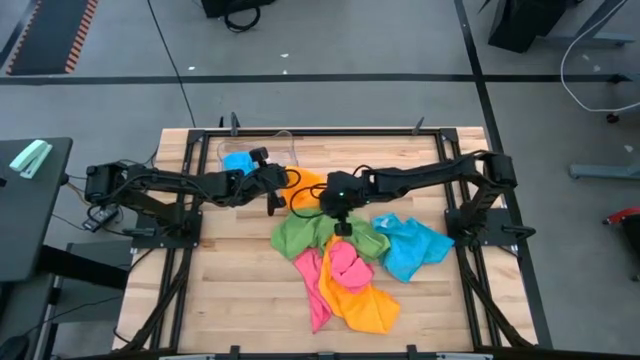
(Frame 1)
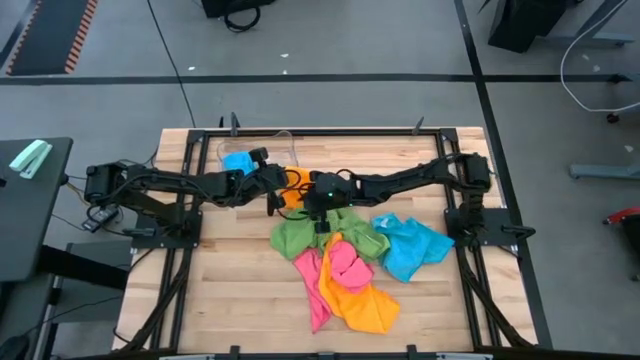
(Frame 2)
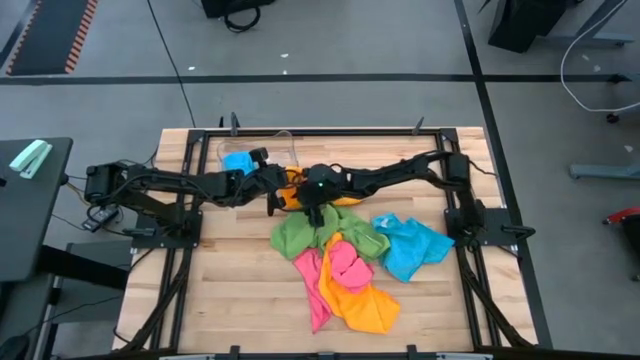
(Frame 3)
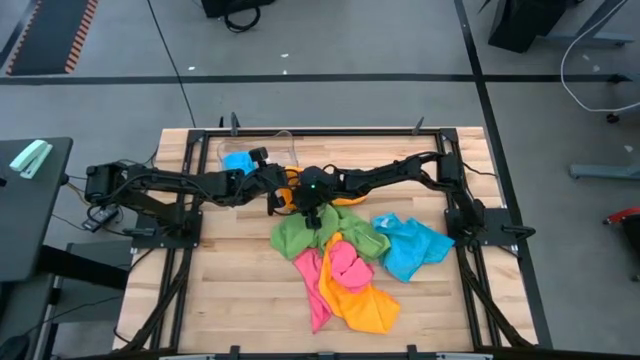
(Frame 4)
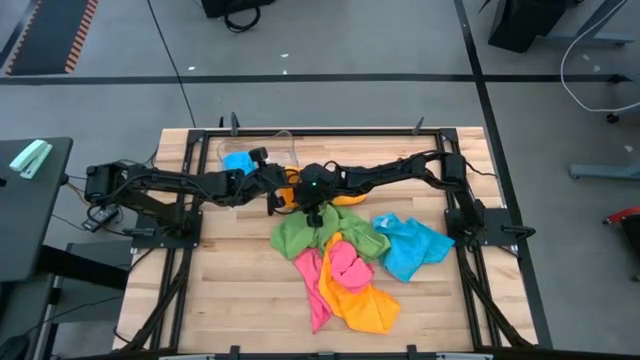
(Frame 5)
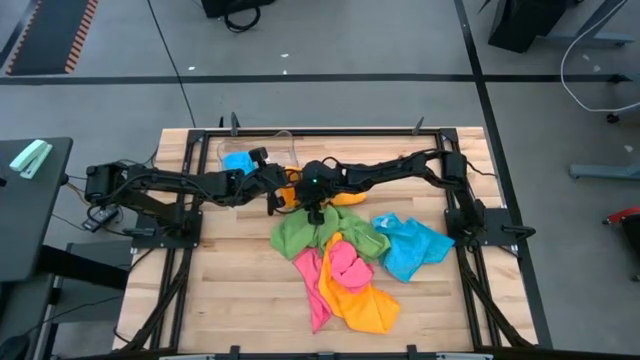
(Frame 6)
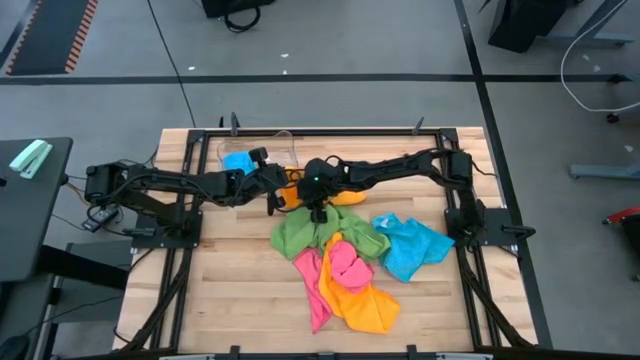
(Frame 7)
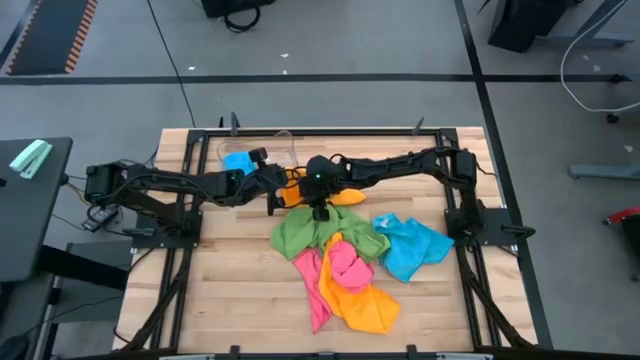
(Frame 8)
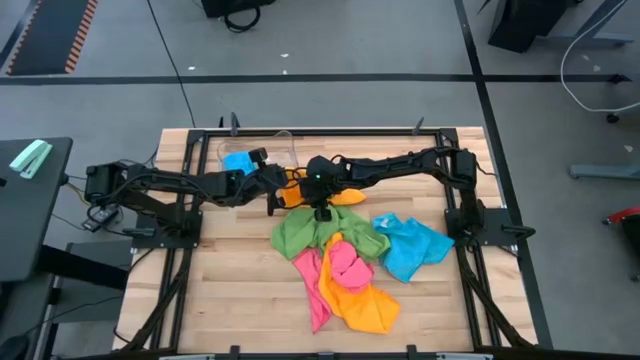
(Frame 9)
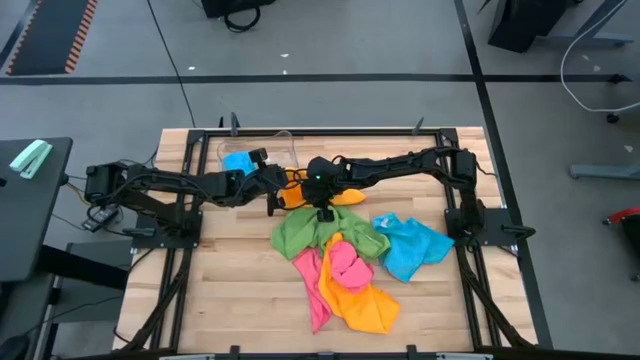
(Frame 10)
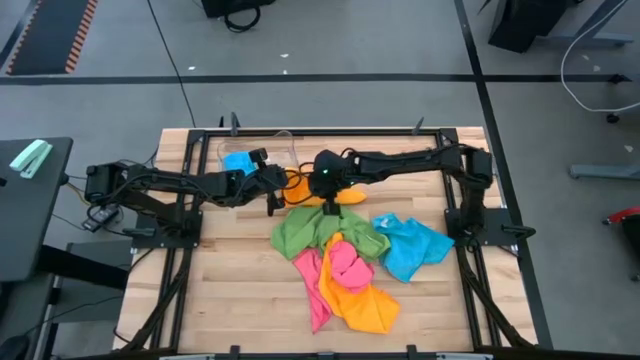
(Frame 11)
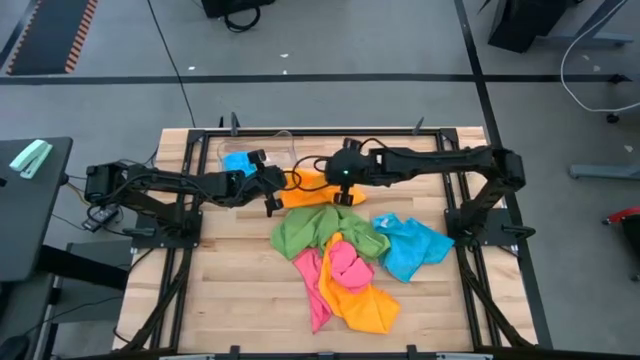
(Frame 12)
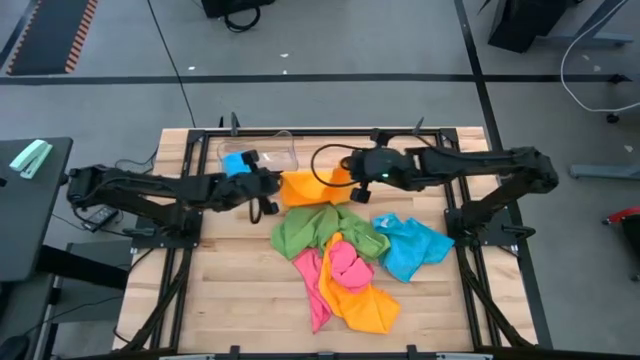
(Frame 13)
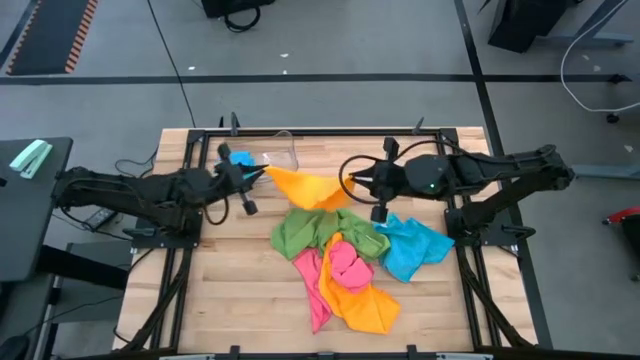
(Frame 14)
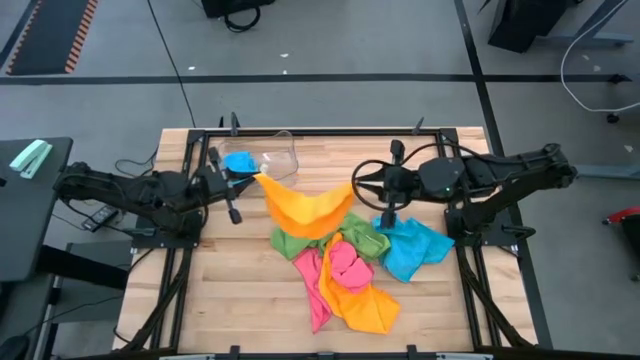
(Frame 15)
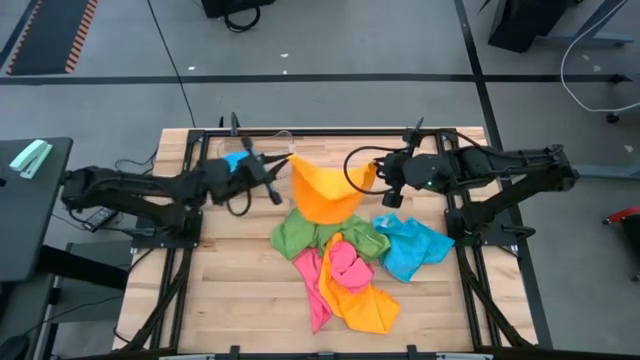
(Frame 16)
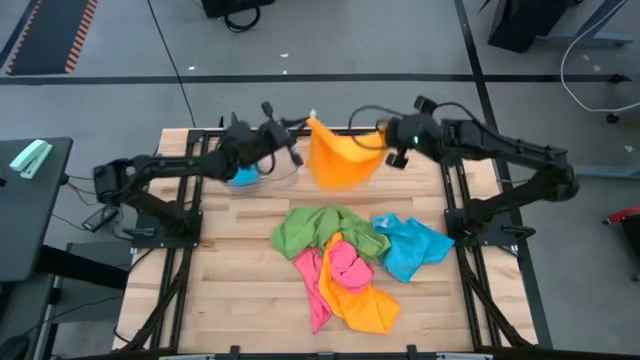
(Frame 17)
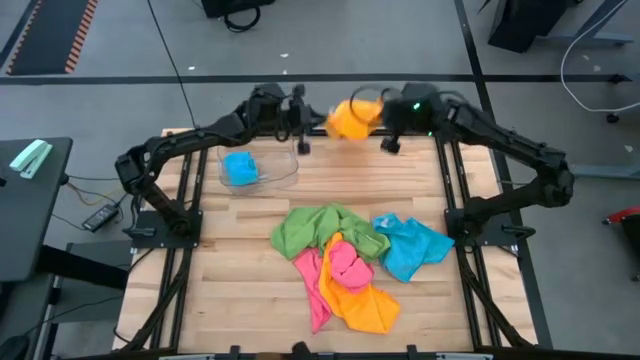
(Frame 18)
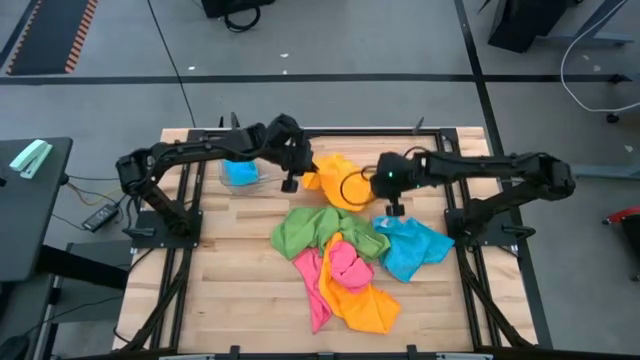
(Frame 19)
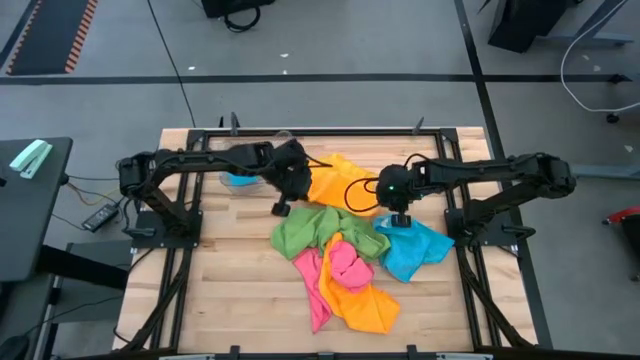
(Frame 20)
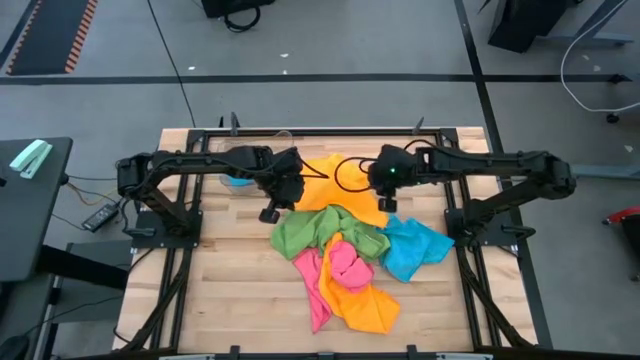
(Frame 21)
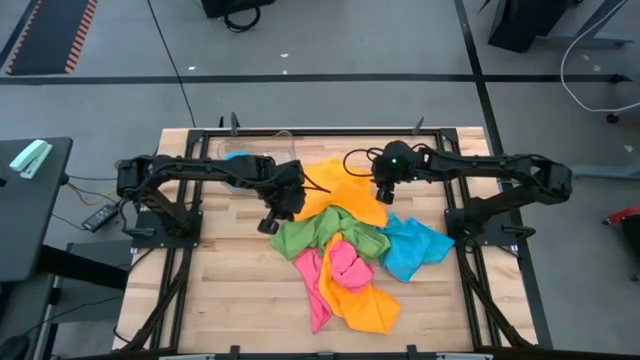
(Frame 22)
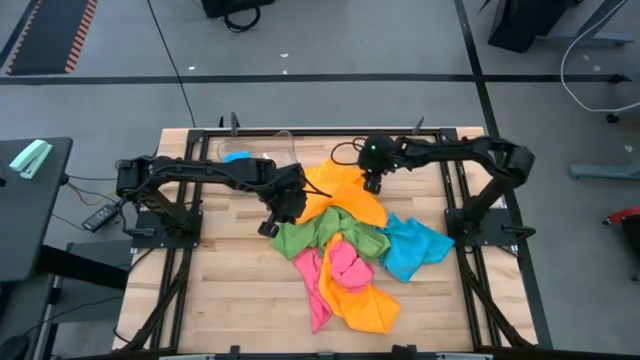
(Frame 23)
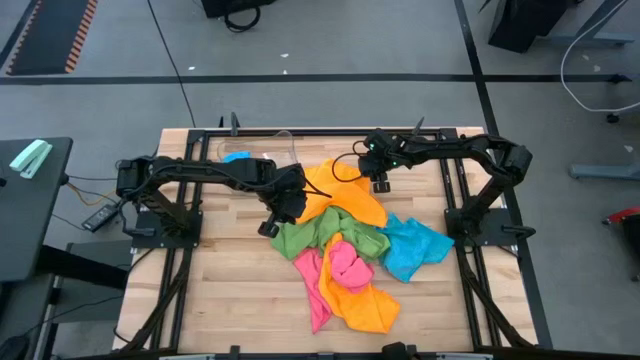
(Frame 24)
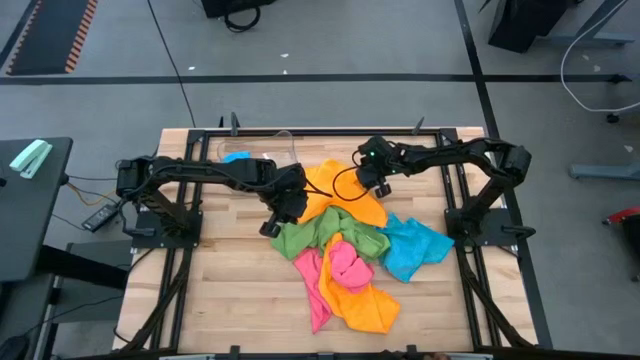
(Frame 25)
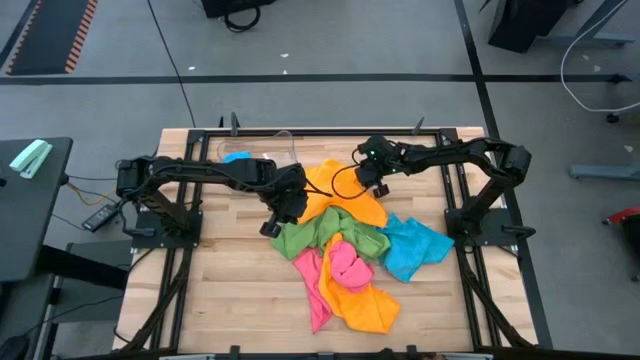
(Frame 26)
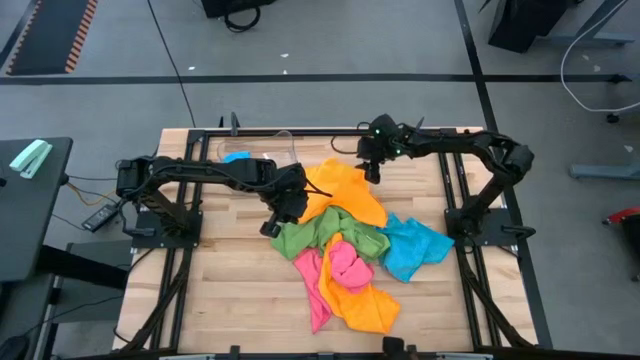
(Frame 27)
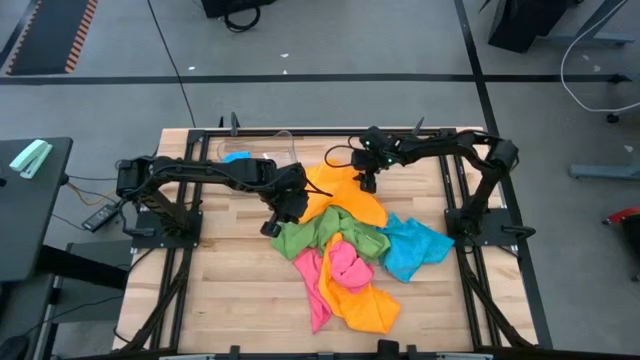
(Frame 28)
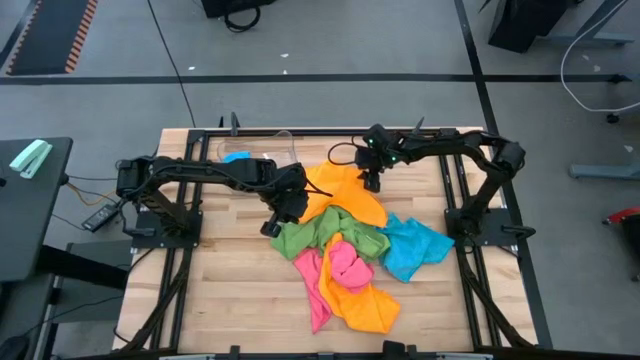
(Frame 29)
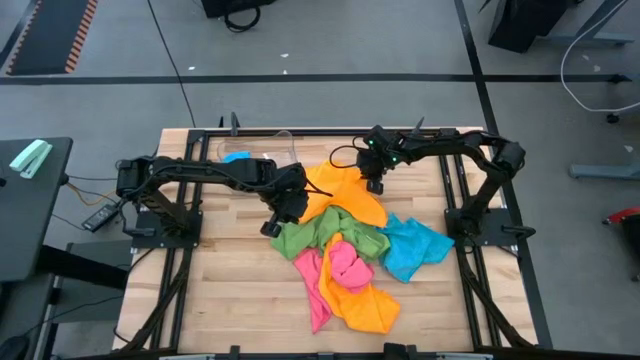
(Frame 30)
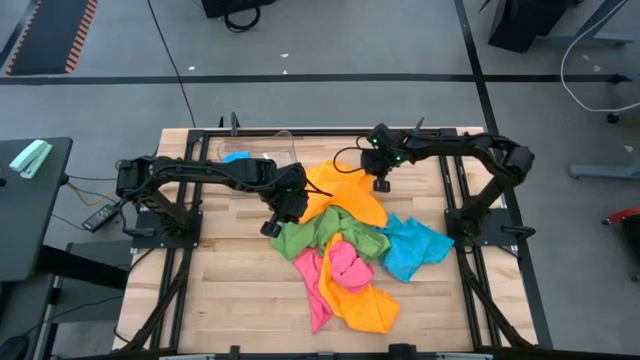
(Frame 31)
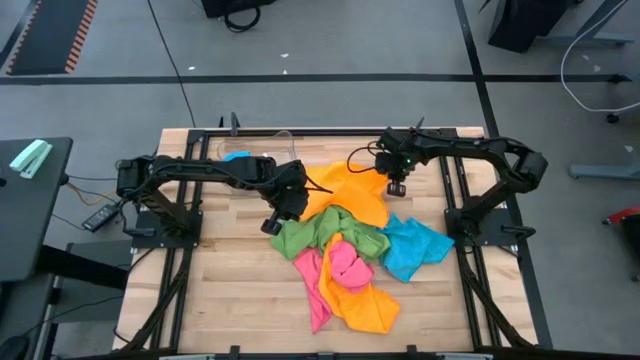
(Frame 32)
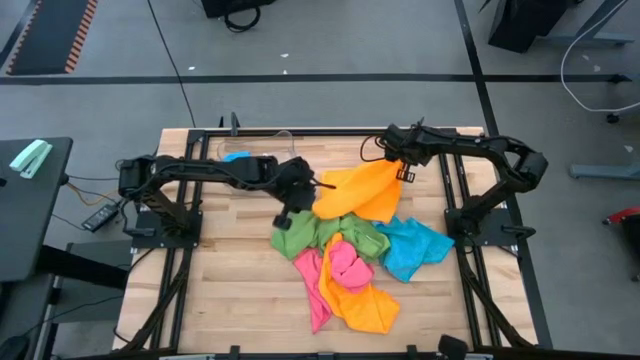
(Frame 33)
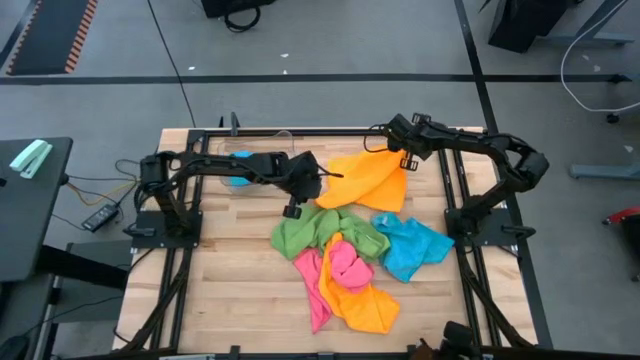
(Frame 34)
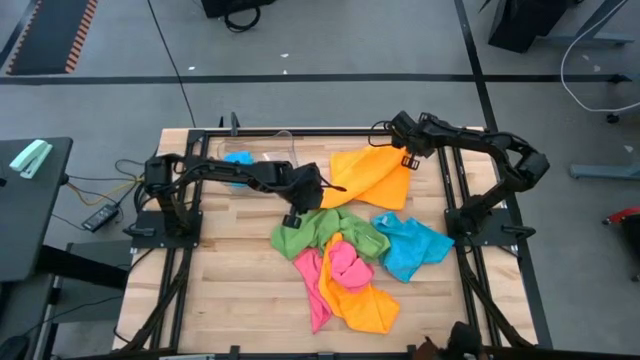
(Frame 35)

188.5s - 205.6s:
Task: Fold microfiber towels
Fold the top orange microfiber towel

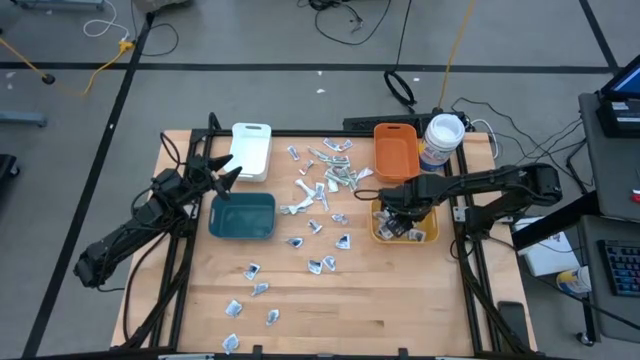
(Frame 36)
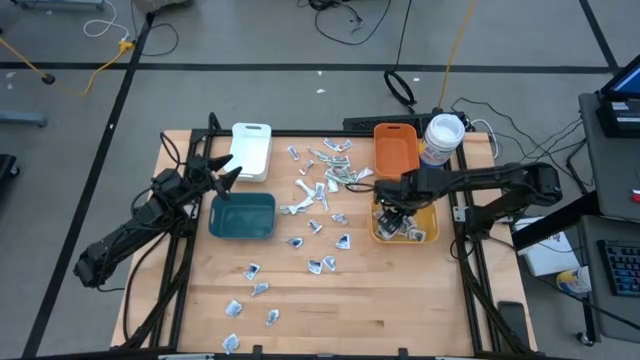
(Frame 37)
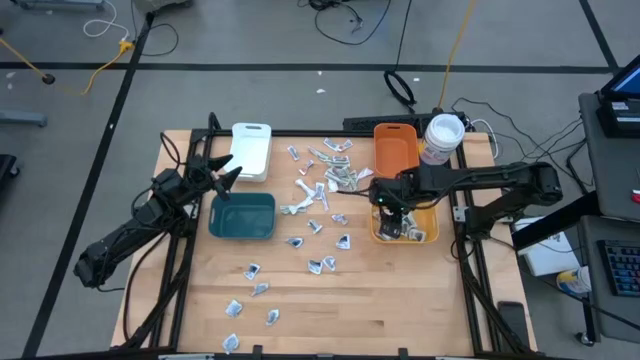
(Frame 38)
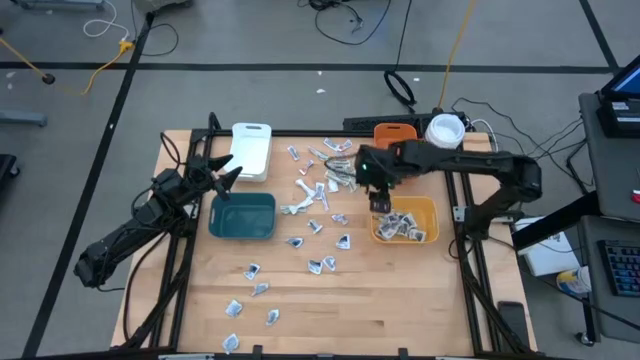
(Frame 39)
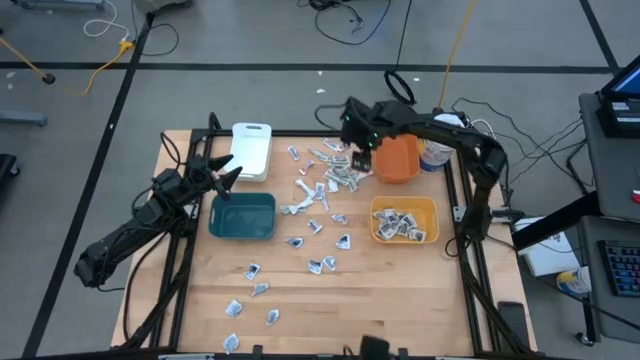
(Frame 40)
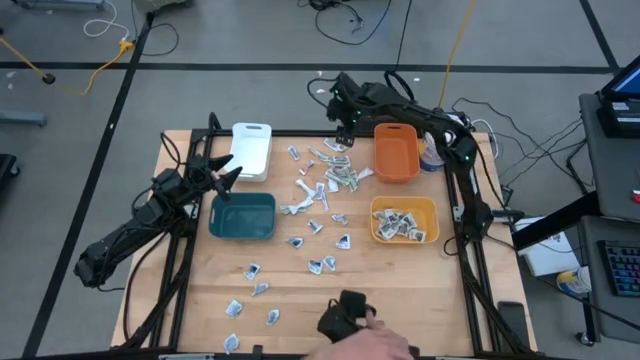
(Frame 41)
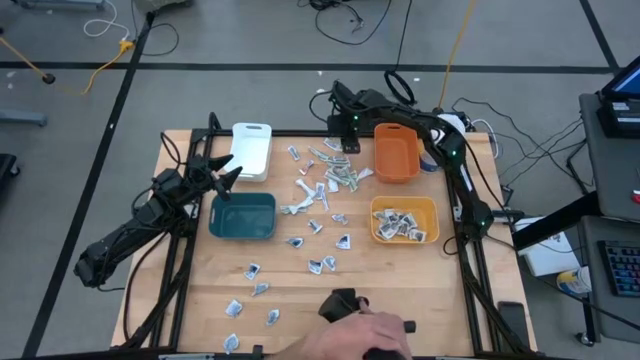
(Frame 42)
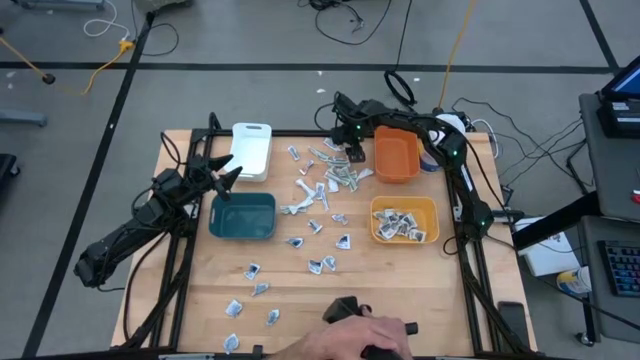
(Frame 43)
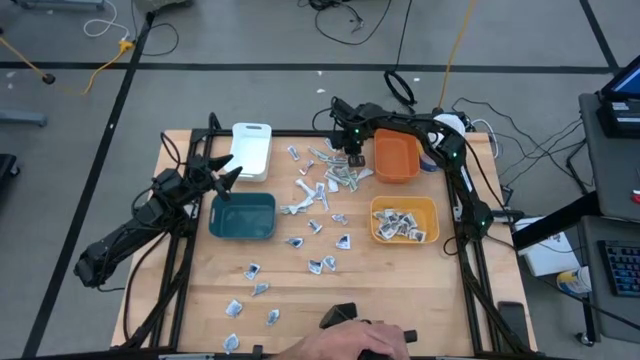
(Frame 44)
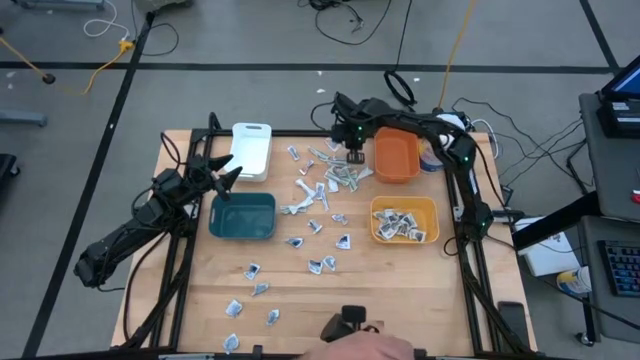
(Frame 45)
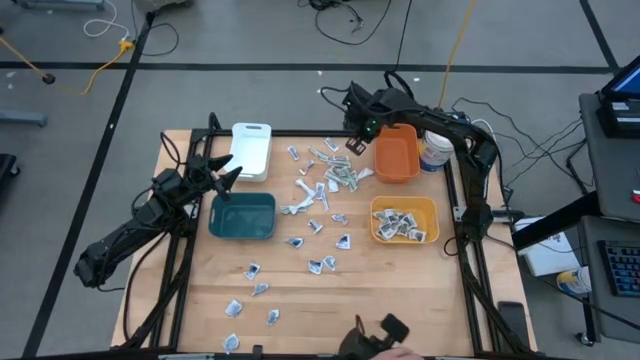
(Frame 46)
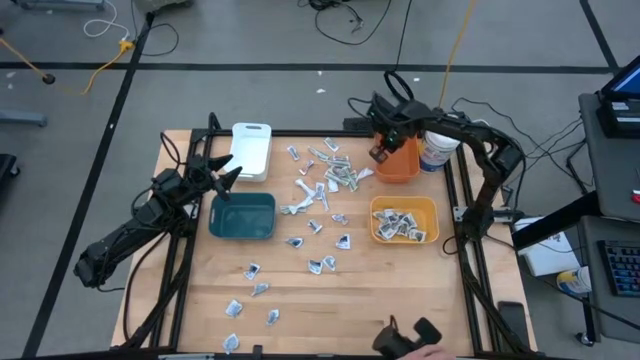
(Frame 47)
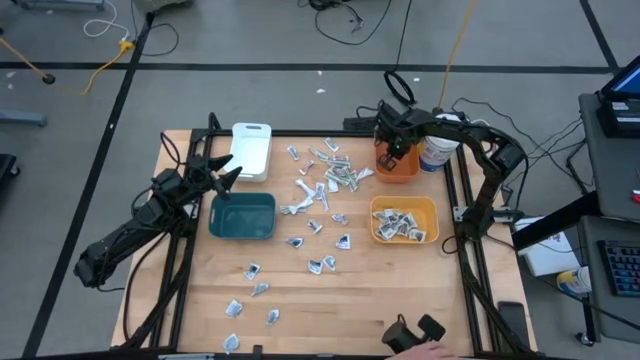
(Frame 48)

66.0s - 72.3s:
Task: Pick & Place First Aid Supplies
Put the antibiotic ointment into the orange bin
